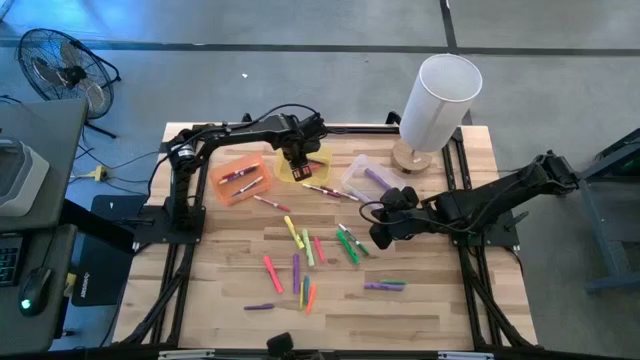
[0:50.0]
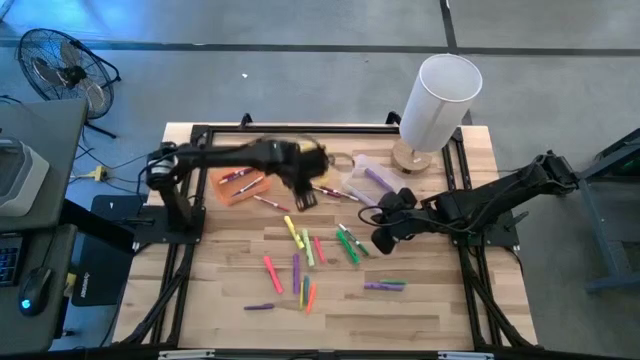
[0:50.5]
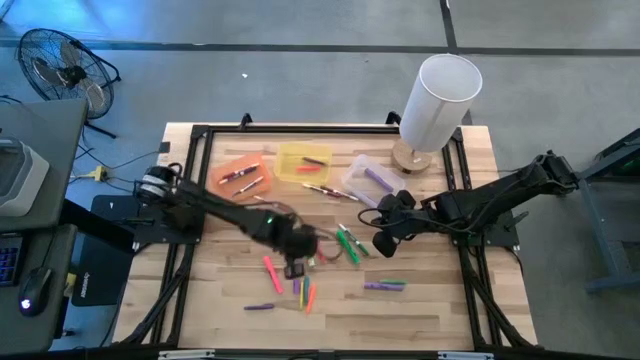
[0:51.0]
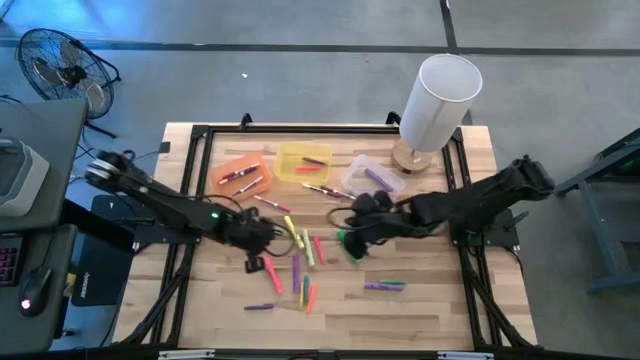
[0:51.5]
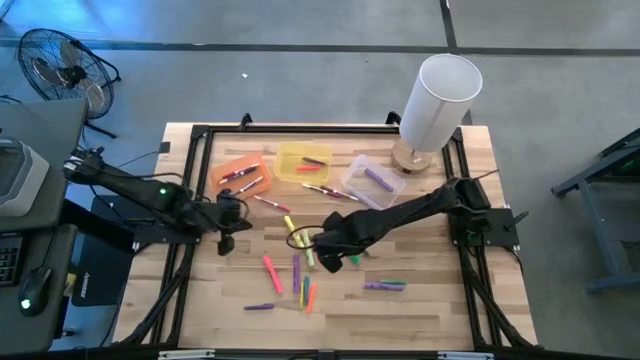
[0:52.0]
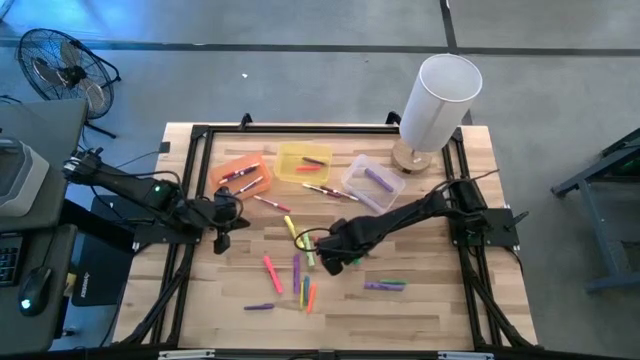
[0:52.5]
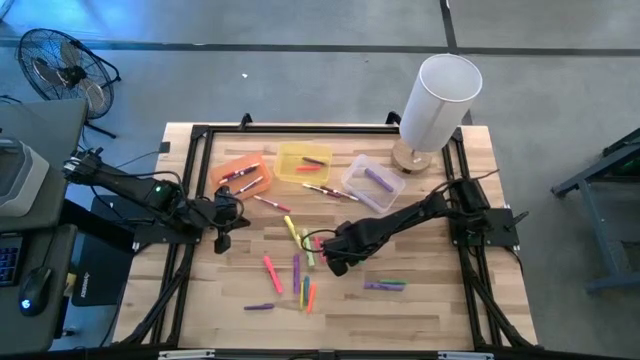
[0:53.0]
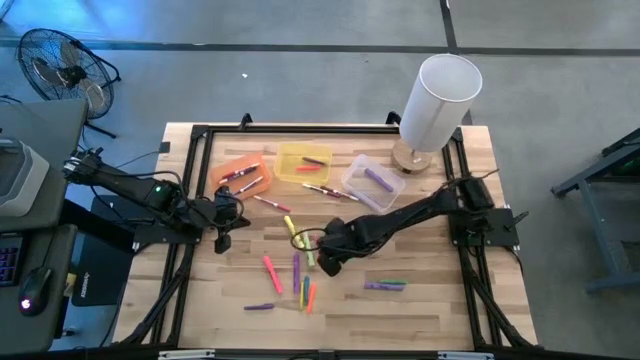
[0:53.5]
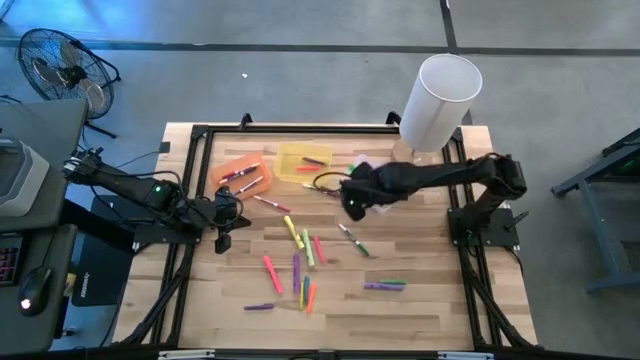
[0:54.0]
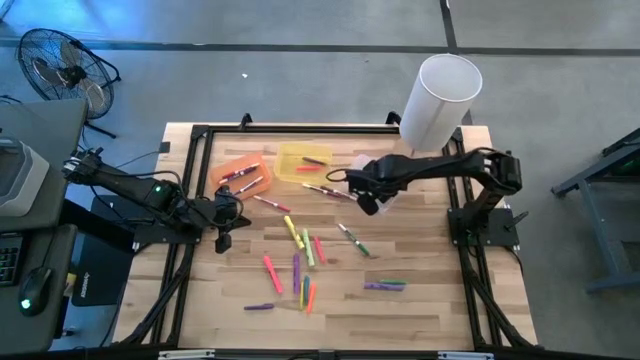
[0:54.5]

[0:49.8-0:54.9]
Task: Pick & Place Markers
Put the green highlighter pen into the white bin

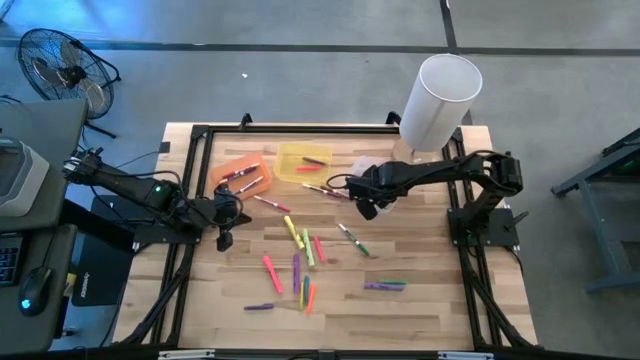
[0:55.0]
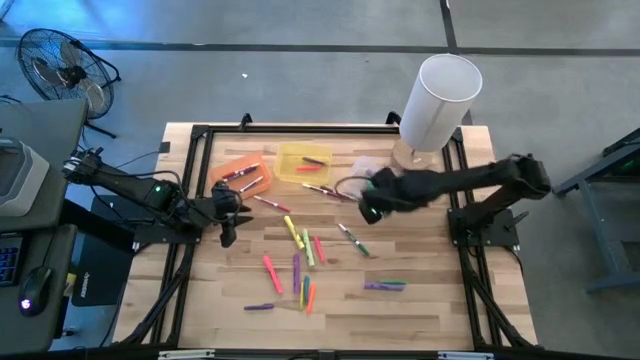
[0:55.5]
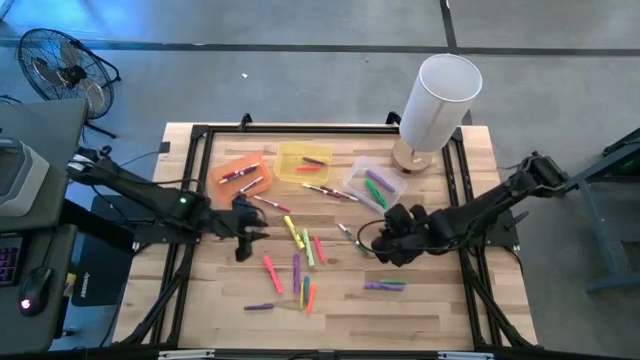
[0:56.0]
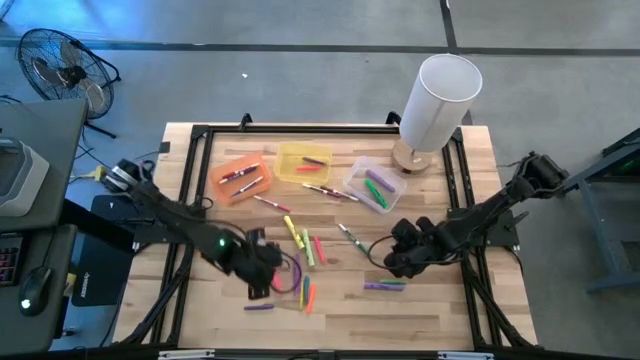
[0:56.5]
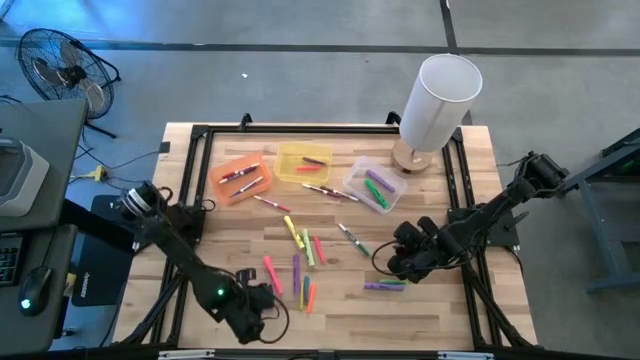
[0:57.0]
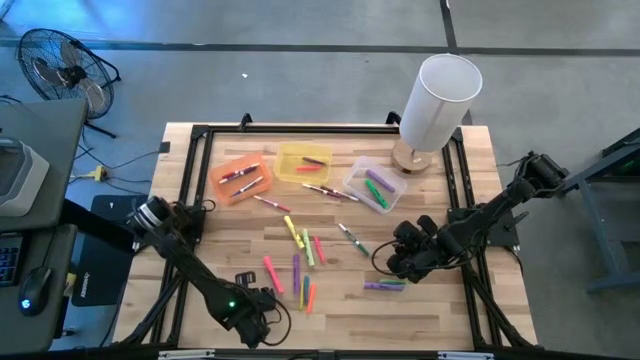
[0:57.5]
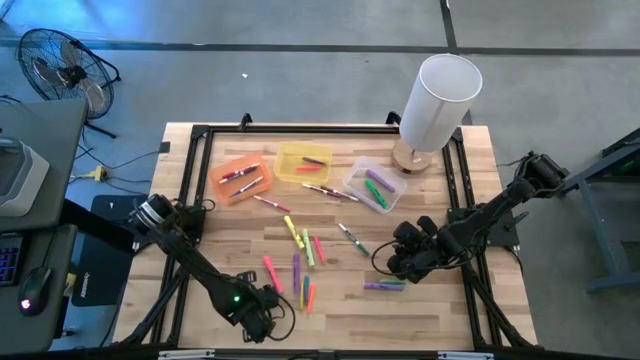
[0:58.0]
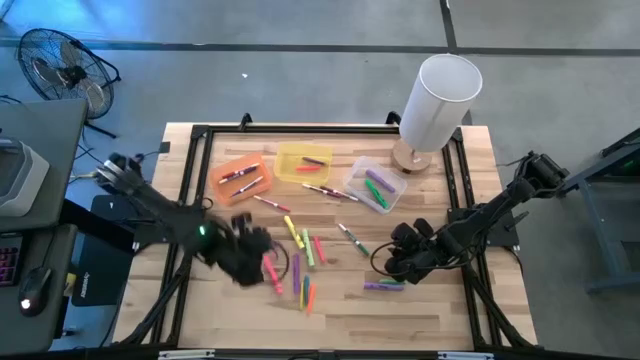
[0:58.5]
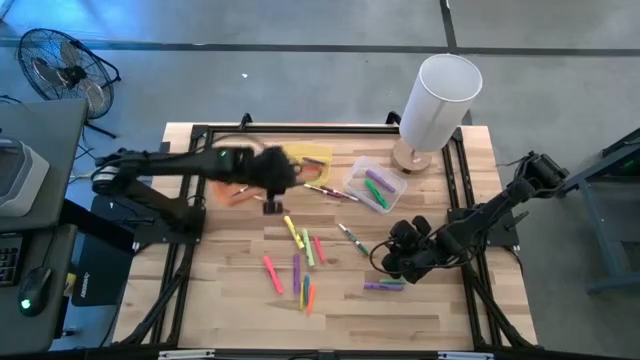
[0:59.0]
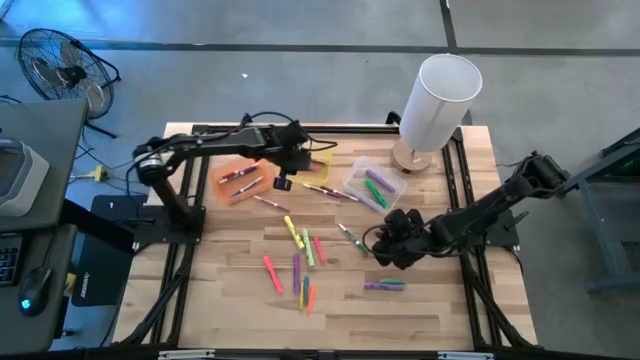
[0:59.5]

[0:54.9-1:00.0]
Put the purple pen into the yellow bin

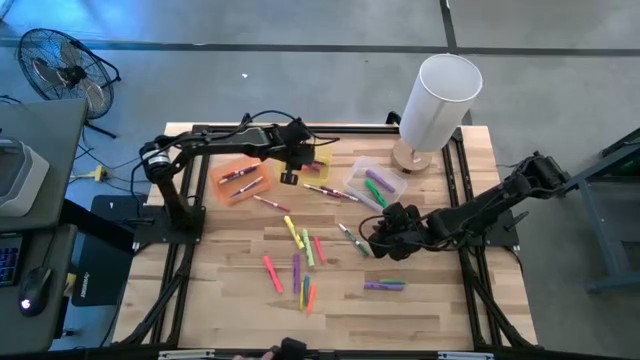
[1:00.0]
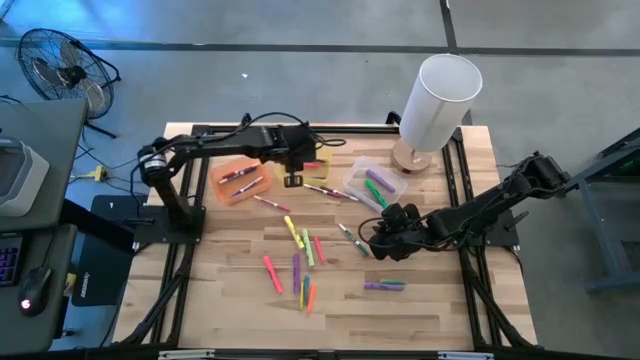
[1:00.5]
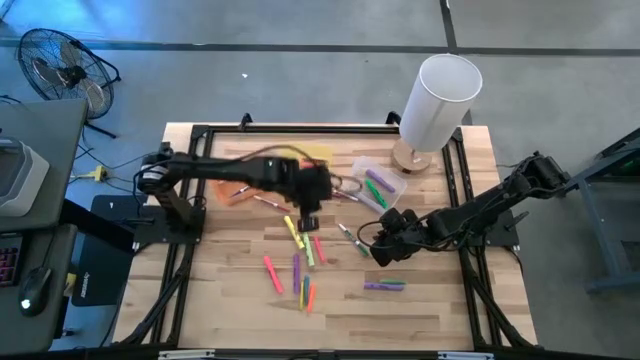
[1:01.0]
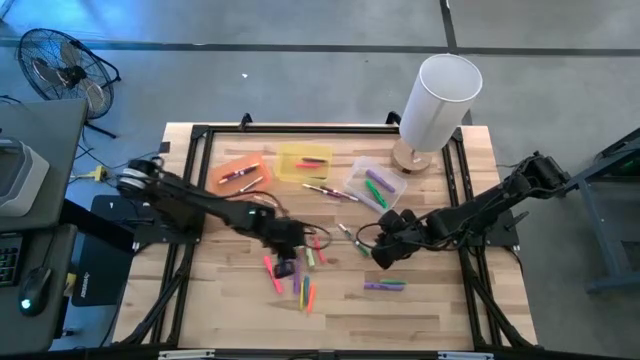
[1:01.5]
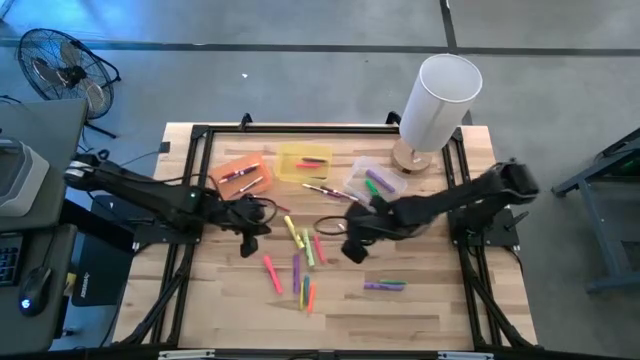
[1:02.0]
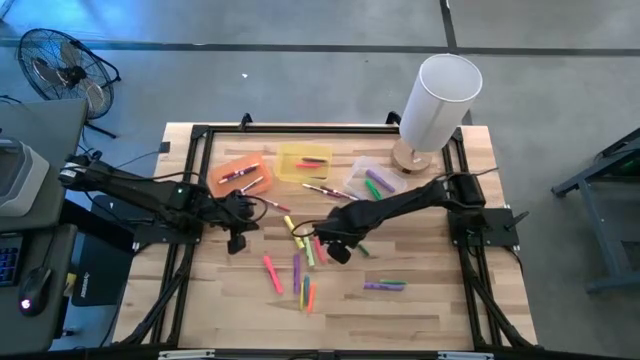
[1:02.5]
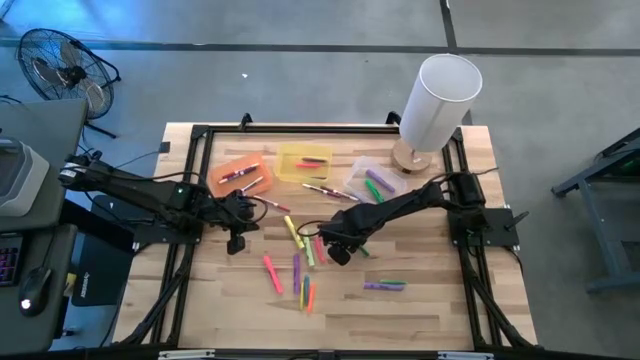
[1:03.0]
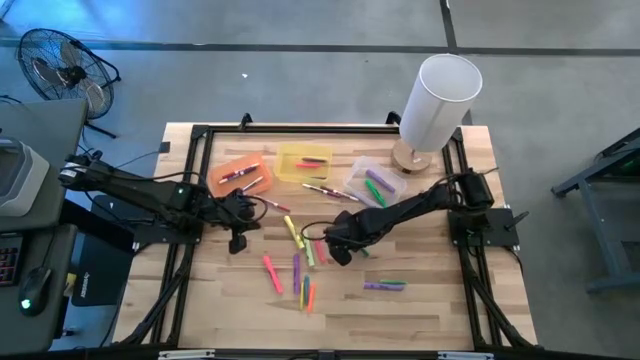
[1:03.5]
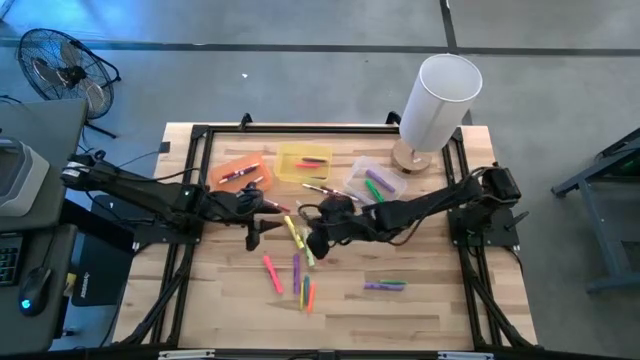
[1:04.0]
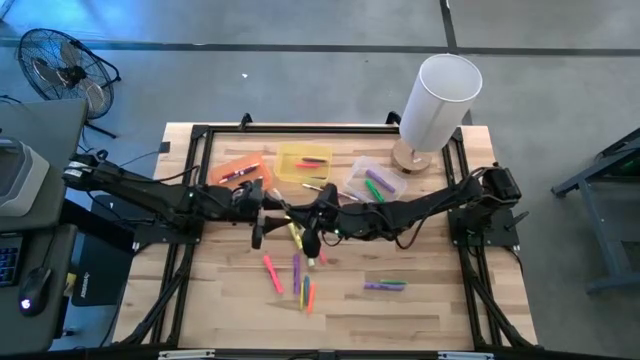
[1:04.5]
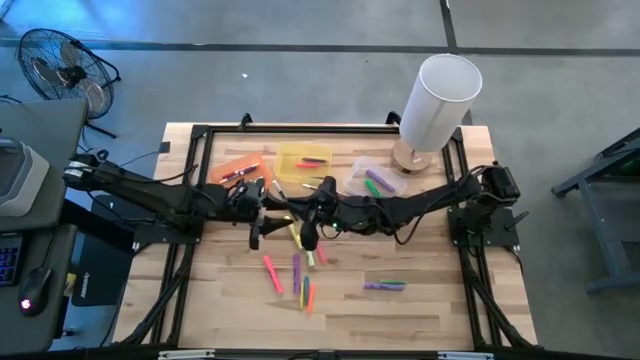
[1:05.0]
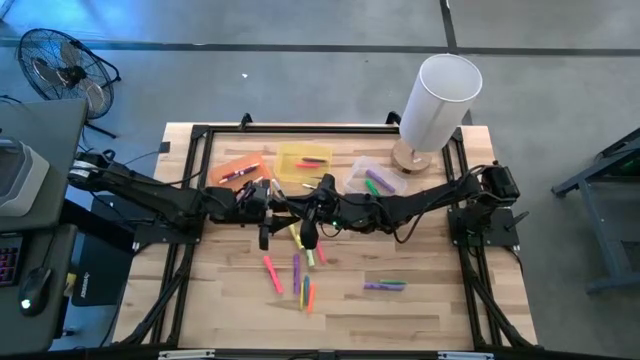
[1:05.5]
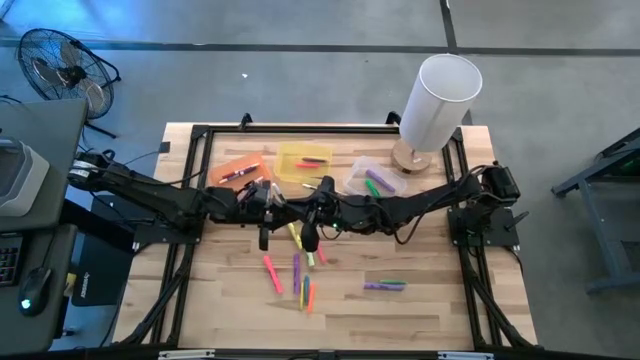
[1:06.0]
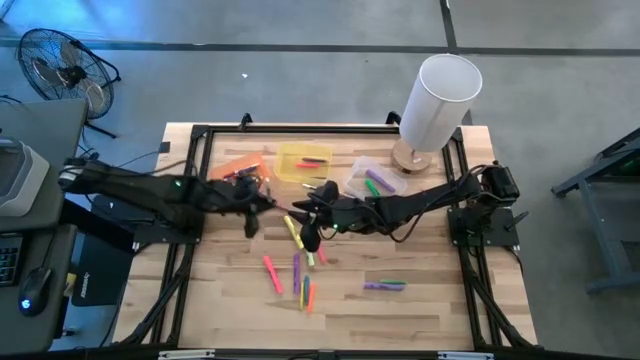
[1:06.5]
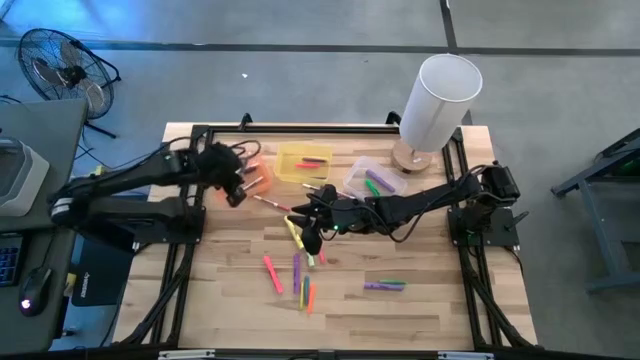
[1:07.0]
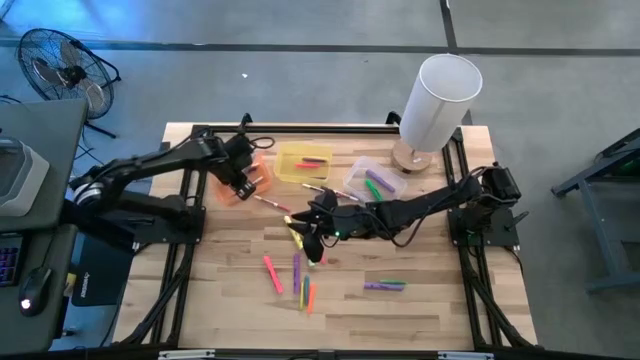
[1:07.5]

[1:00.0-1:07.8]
Put the green marker pen into the orange bin

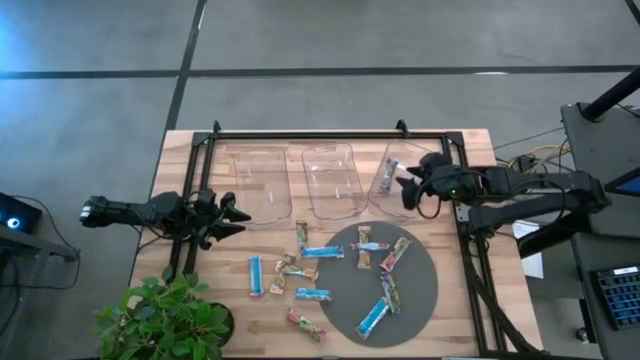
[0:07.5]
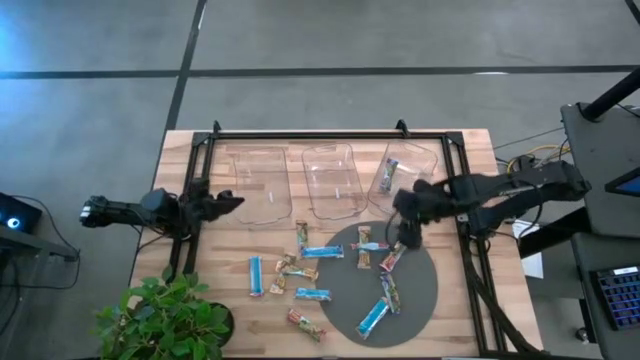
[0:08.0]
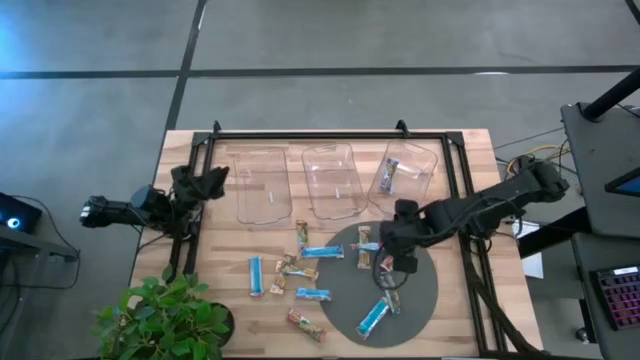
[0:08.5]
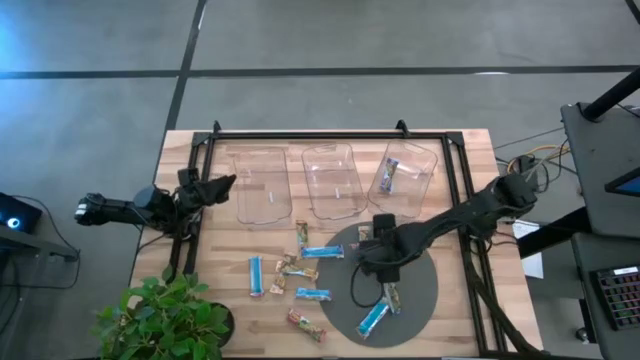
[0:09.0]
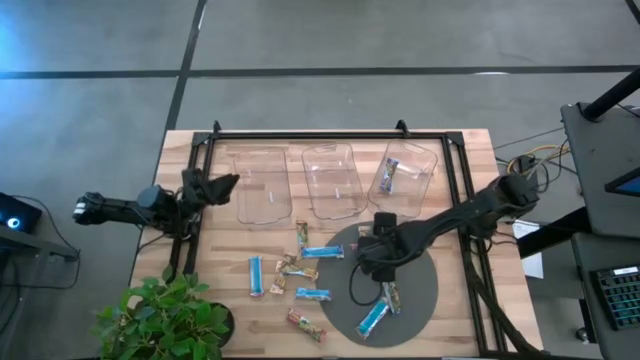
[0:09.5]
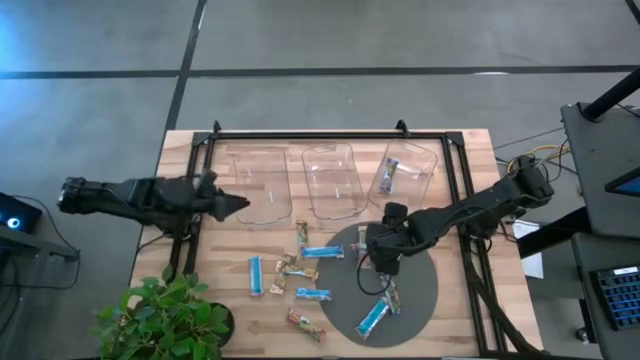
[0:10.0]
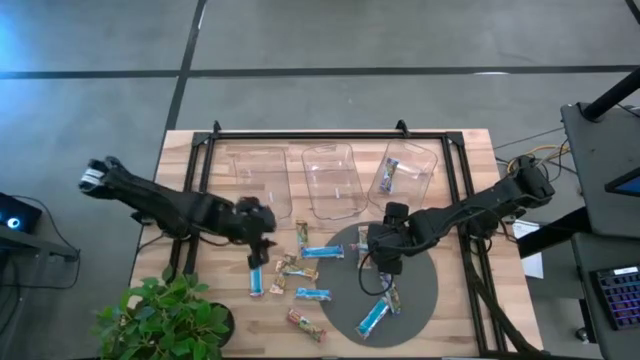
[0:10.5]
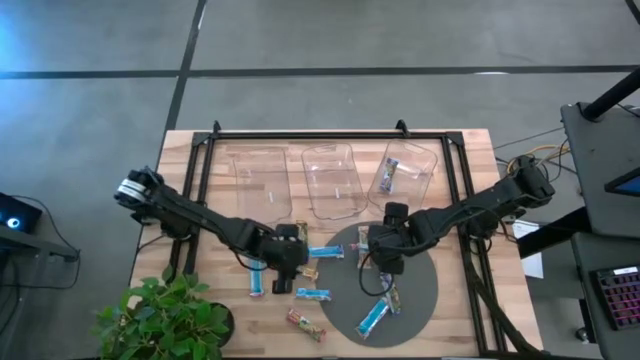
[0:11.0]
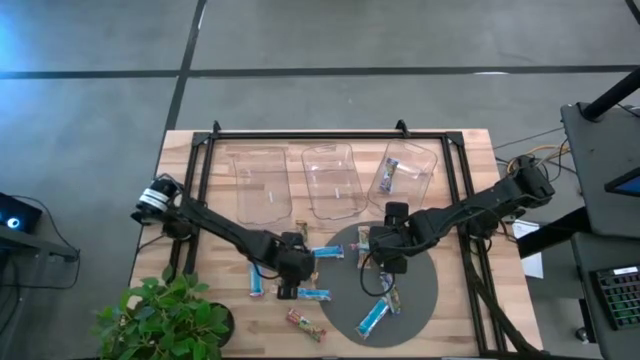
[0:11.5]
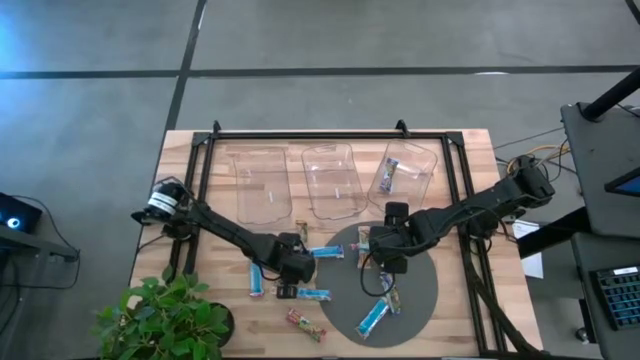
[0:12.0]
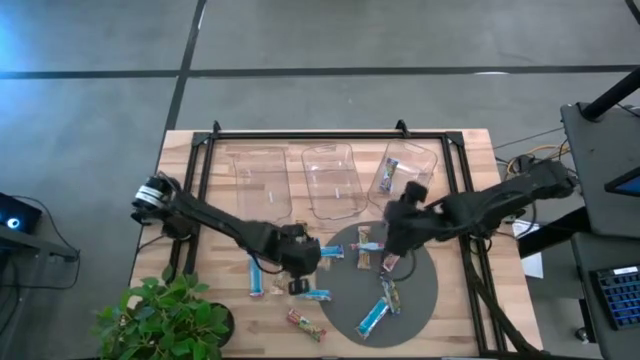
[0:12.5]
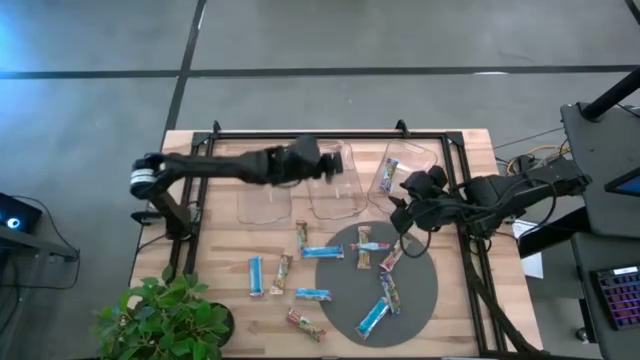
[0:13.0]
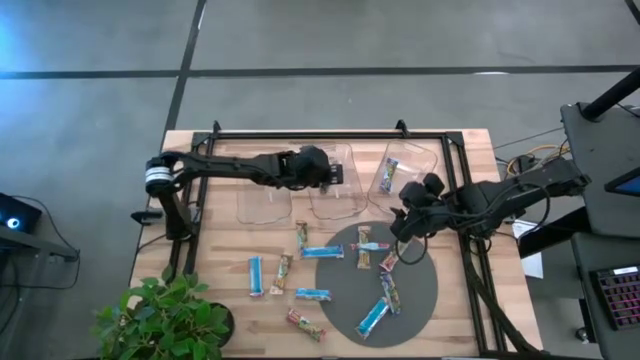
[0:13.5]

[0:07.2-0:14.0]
Task: Pick and place Granola Bars by type
Put the yellow granola bar into the middle transparent bin
